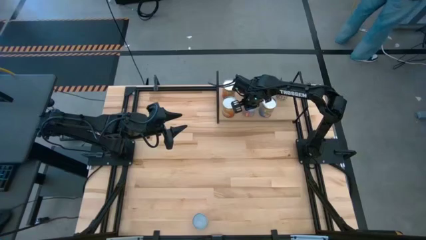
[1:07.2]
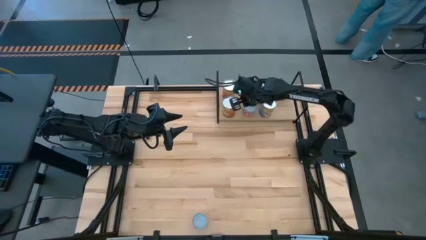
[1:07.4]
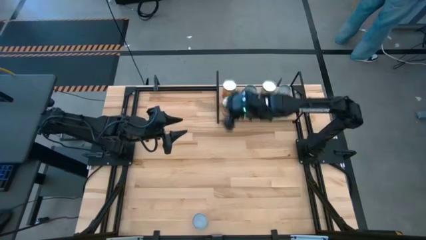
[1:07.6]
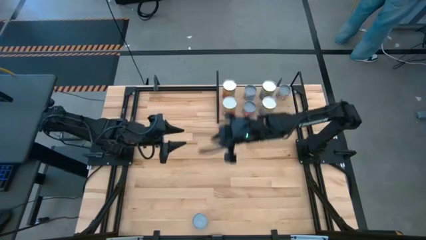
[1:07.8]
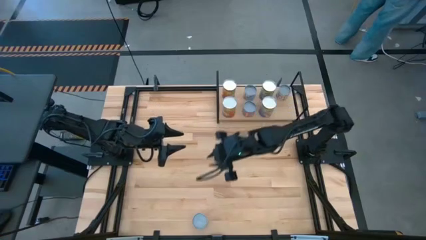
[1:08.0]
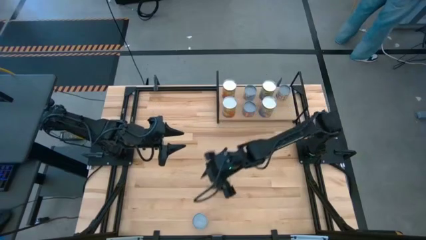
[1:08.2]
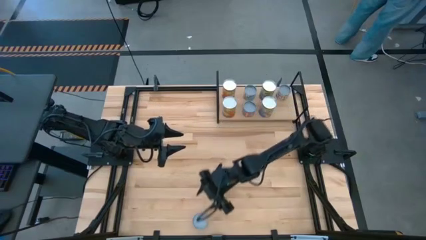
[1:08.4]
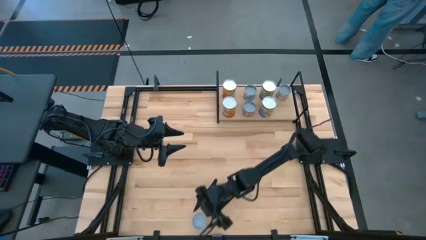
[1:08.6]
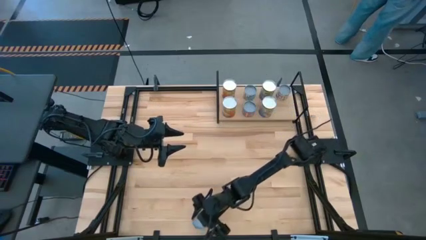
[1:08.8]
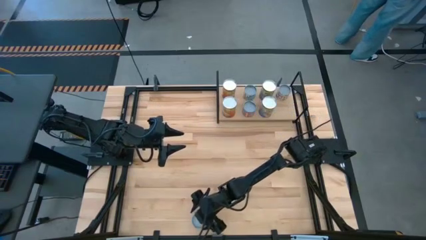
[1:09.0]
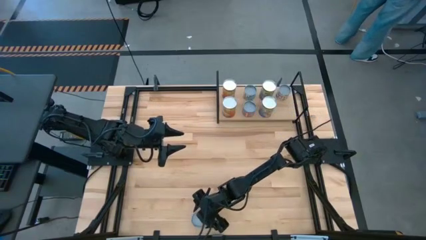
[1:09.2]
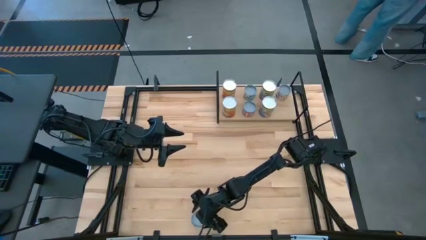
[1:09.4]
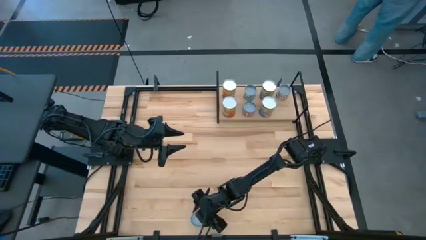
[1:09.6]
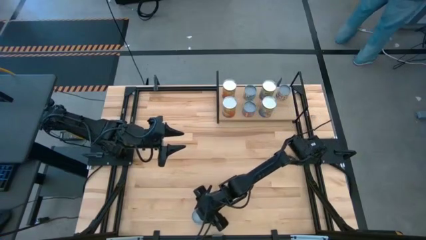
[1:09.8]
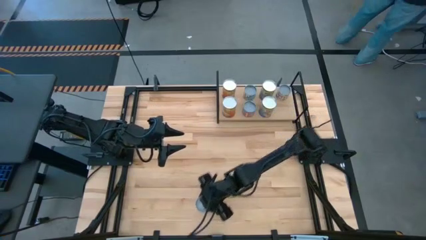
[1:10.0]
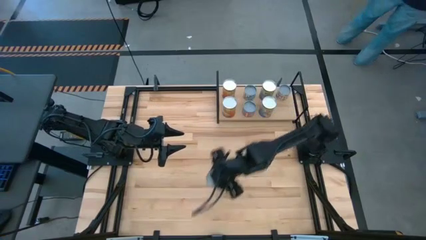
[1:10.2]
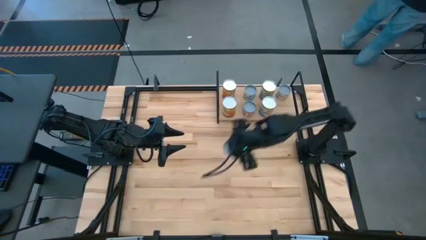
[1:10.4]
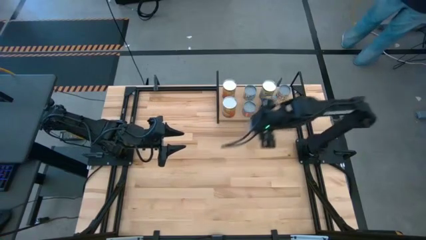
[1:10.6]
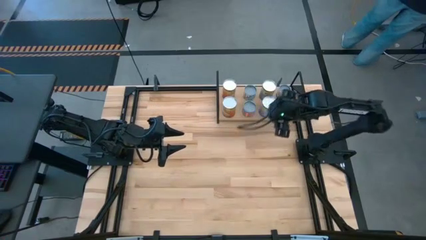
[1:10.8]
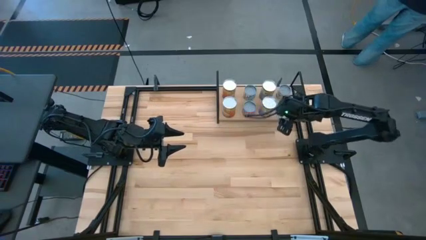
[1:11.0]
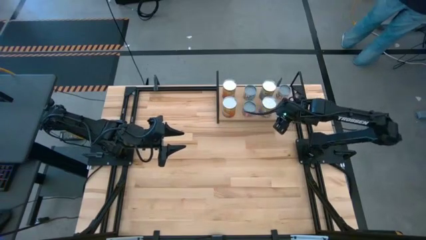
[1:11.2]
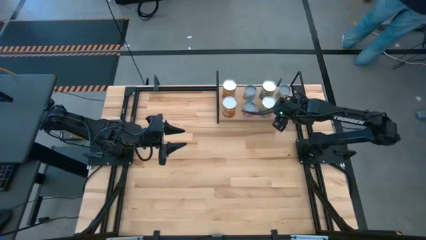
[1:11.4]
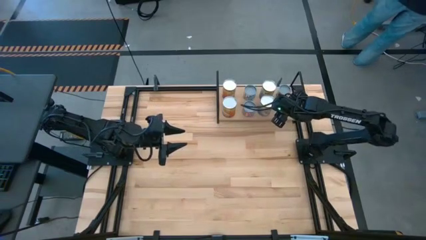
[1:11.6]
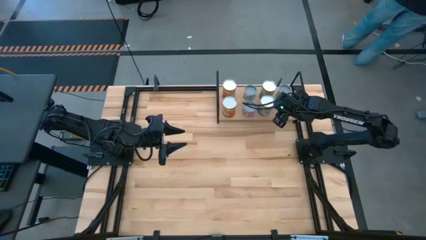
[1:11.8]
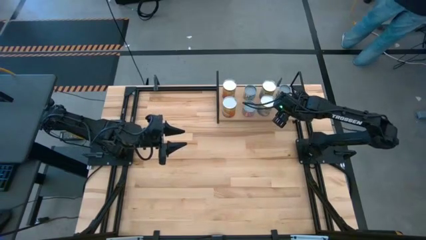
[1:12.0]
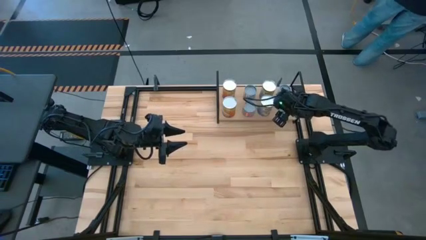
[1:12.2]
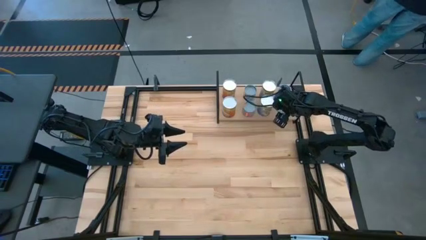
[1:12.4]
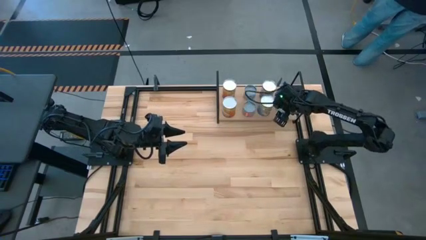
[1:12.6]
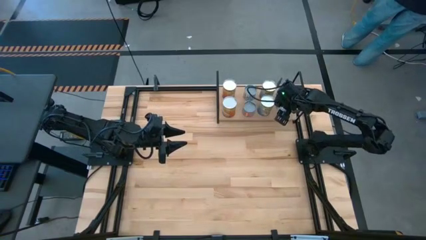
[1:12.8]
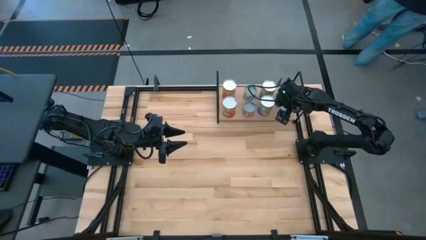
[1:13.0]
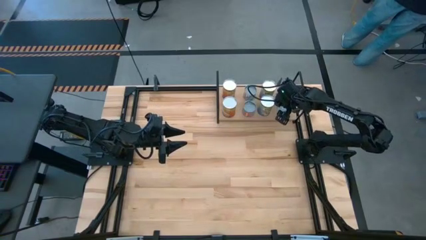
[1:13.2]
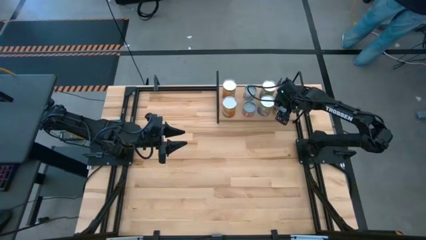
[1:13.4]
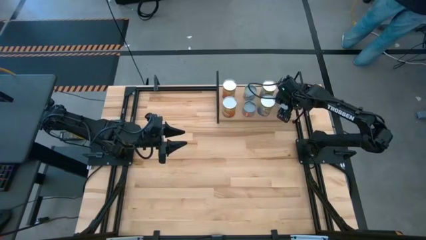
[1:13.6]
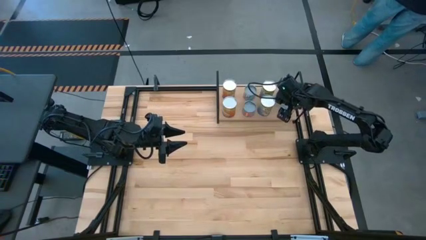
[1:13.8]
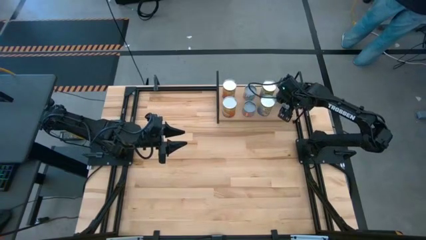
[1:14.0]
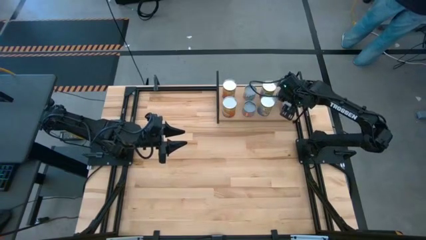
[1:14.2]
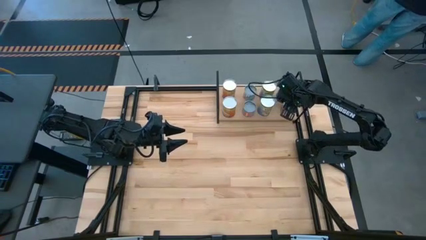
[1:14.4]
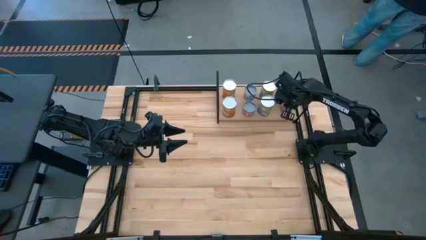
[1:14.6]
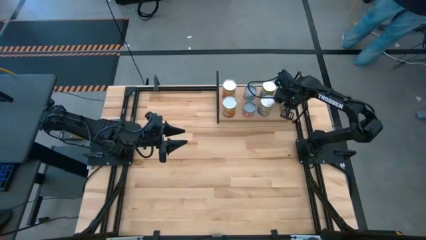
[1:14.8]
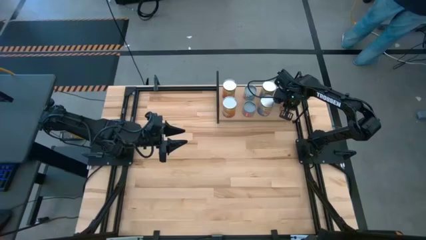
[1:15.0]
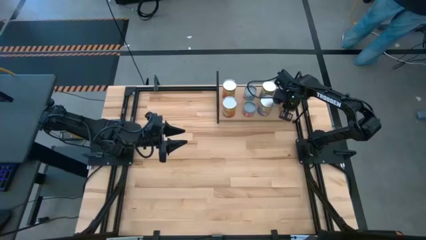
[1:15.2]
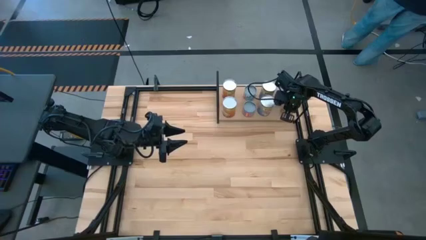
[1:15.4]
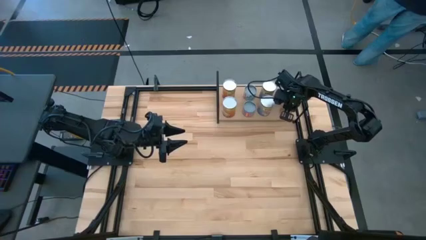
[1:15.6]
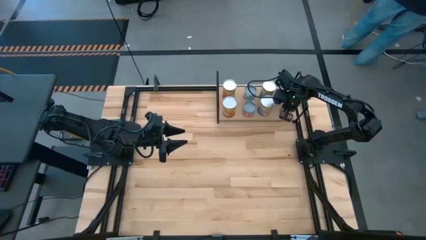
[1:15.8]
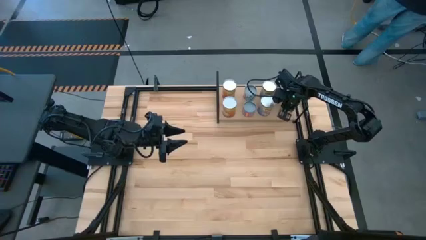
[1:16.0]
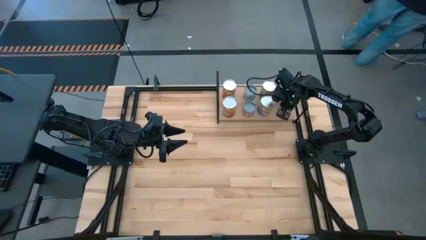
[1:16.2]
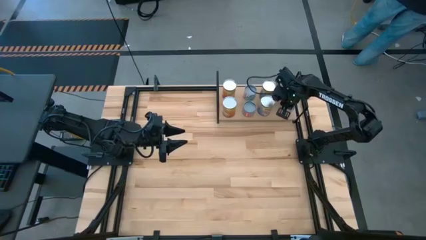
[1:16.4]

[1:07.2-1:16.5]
Task: Pick and place cans onto a shelf
Put the small orange can on the shelf aligned with the other small green can

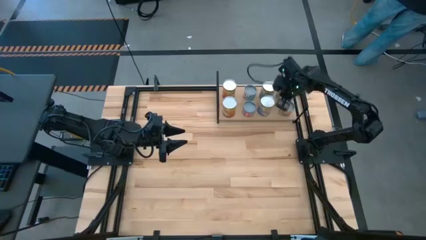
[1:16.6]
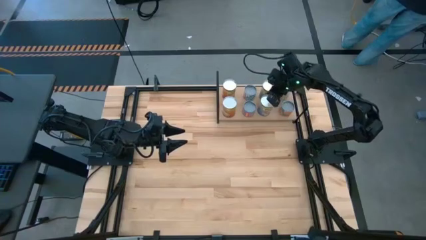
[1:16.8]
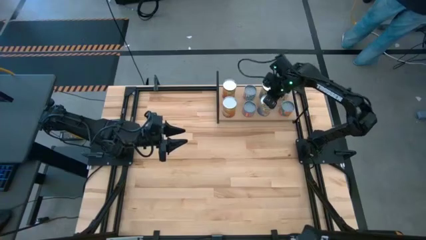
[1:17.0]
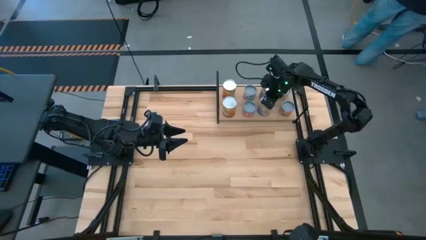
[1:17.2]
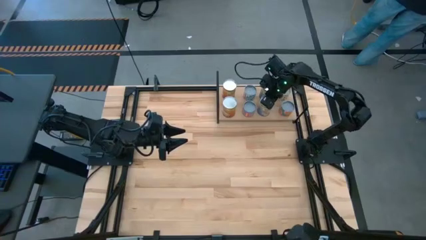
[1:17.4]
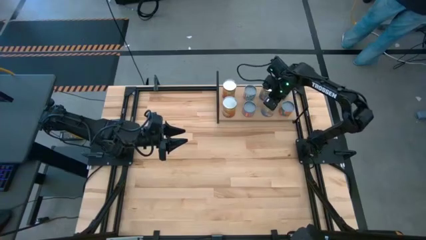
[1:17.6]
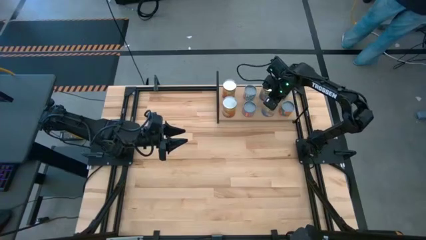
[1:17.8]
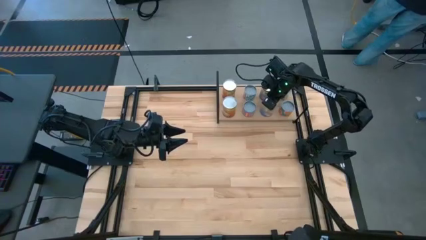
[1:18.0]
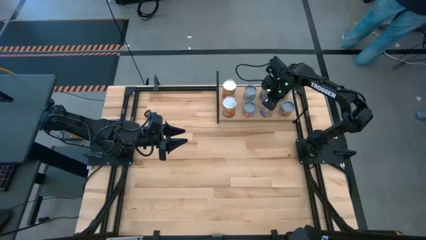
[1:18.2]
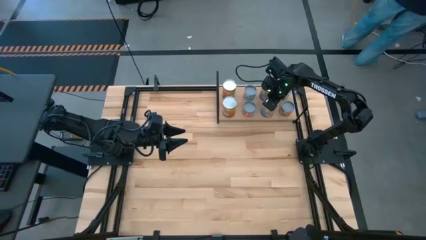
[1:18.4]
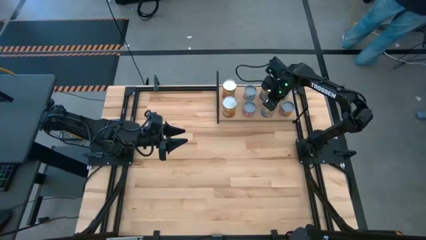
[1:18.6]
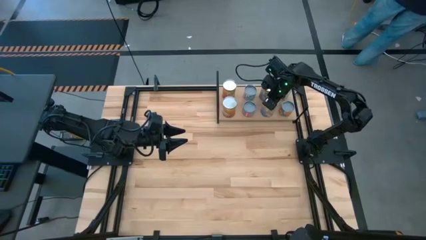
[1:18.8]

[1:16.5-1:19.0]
Adjust the big blue can on the shelf

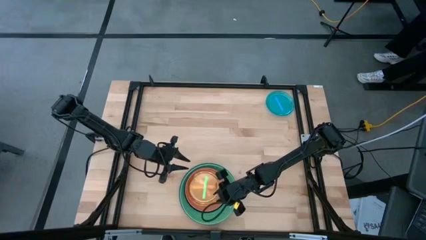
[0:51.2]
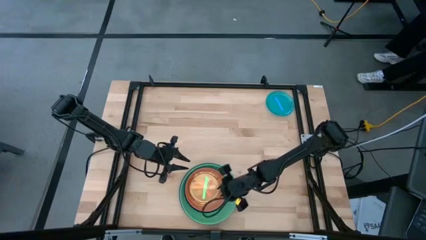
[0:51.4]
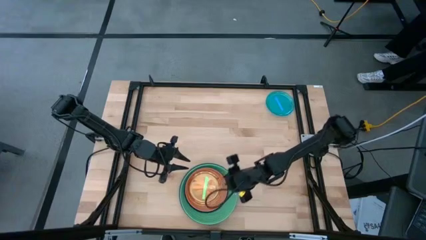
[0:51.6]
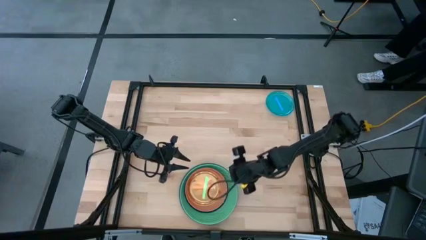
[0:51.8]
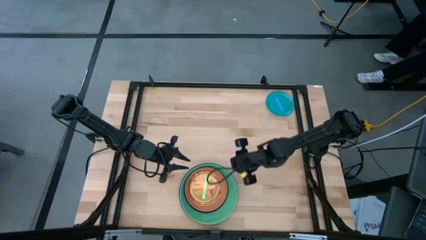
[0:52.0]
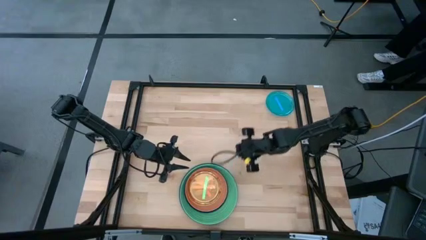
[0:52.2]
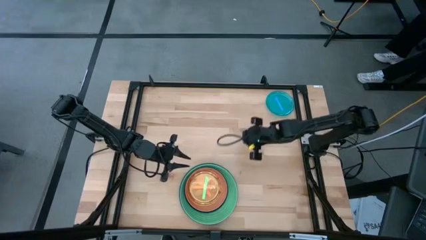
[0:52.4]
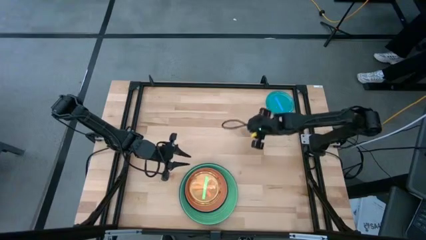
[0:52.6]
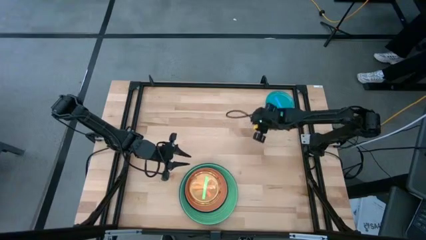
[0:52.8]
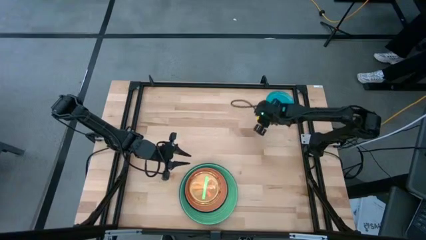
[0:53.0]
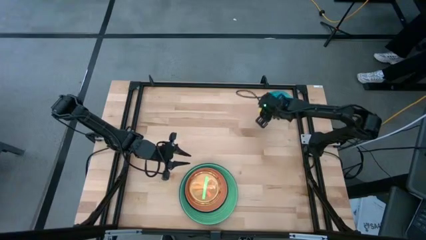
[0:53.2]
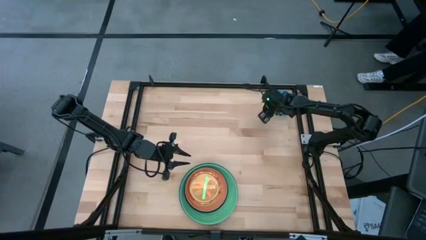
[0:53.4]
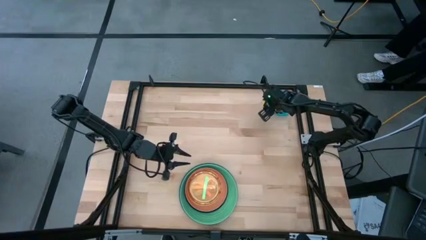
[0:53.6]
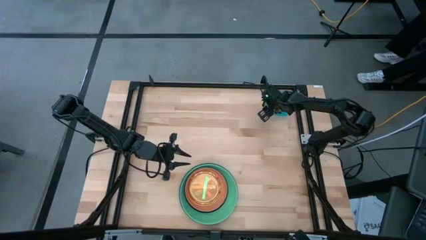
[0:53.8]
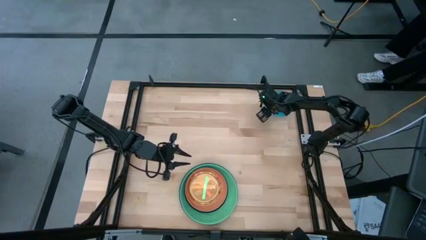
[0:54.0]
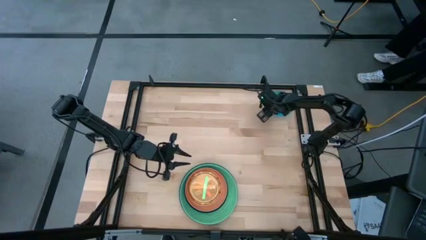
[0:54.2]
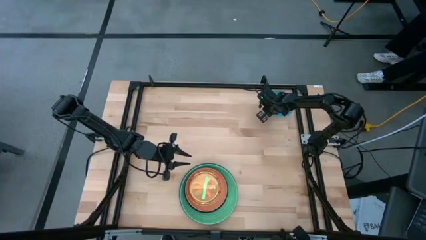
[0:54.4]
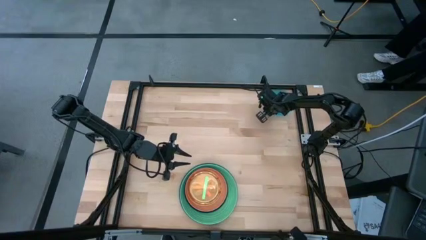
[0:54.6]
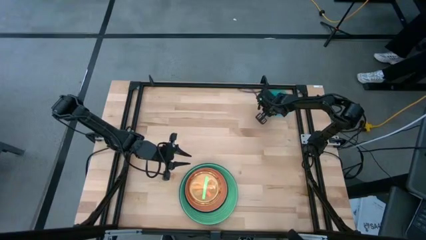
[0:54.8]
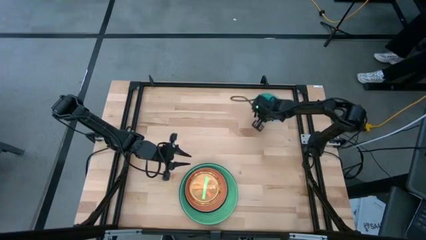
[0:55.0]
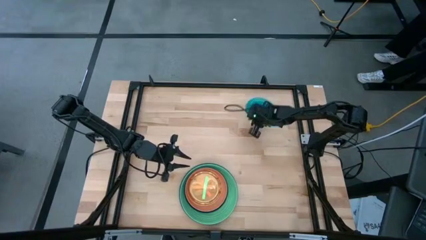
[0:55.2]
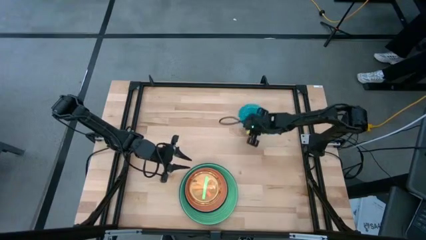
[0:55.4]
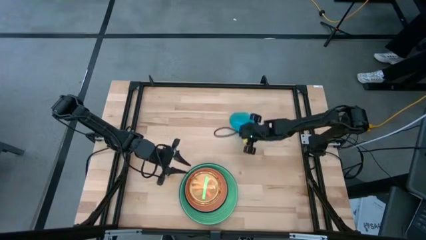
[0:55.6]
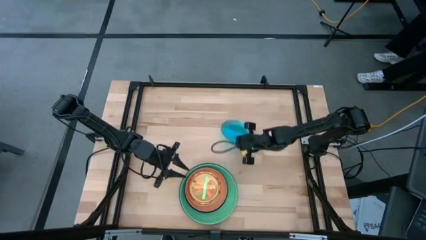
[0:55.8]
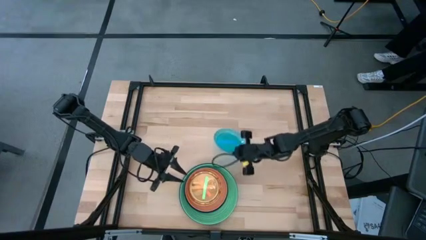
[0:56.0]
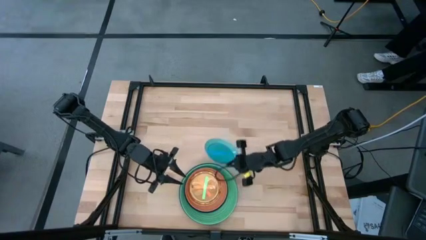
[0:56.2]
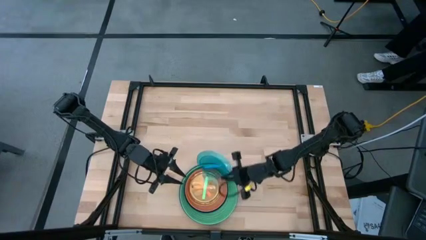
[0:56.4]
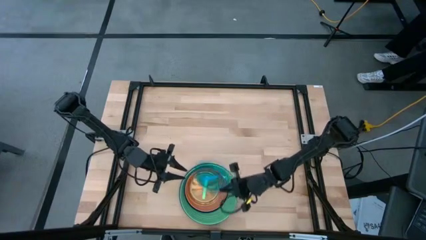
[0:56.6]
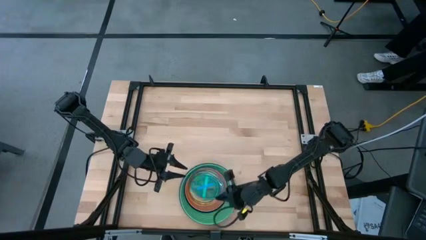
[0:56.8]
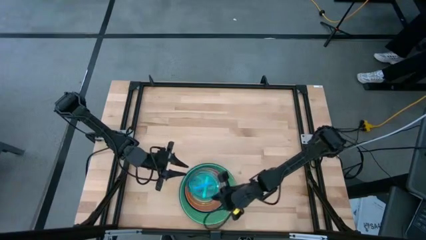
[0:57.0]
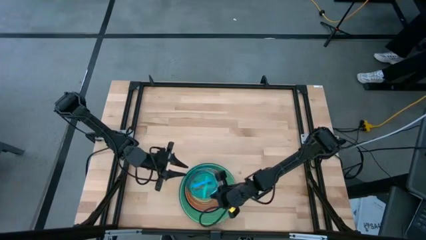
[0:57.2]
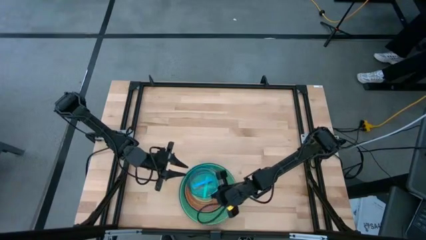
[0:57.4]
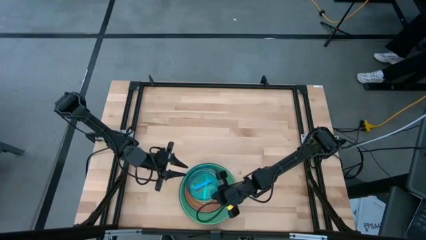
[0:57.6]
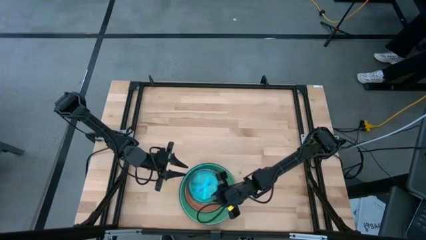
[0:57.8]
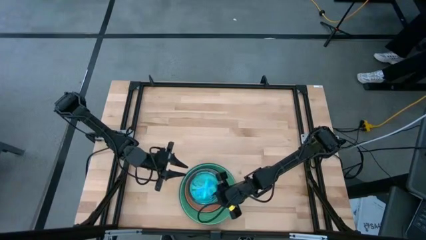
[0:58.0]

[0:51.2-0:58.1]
Task: Stack plastic plates
Stack the blue plate on top of the green plate
